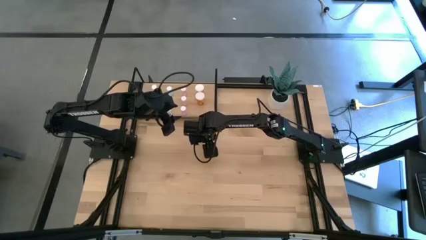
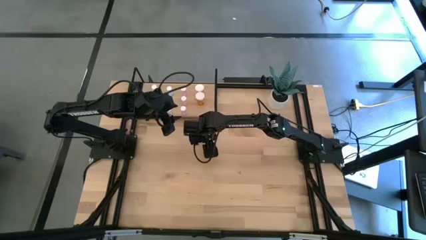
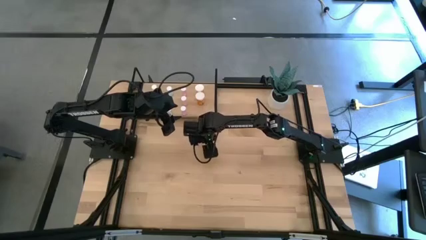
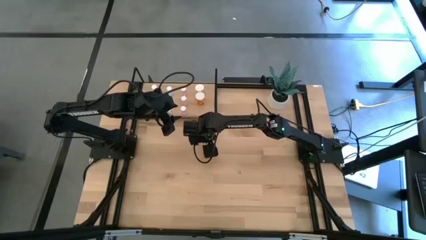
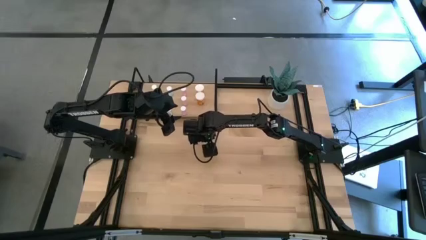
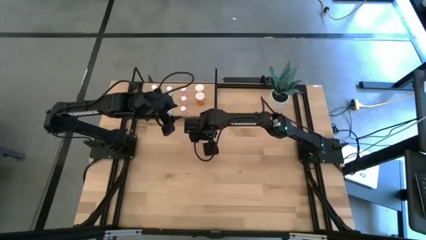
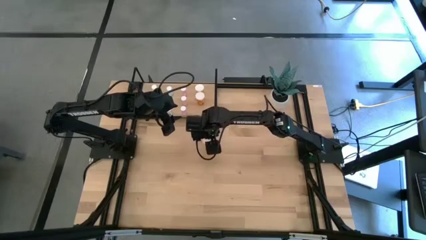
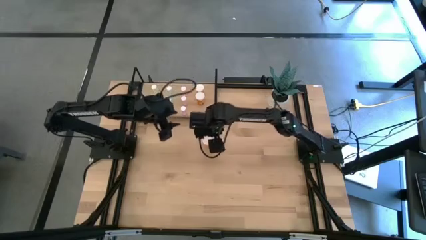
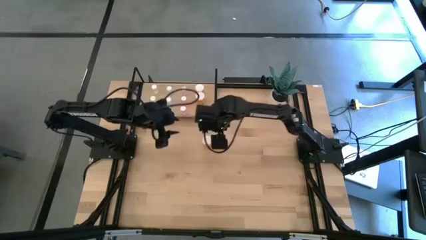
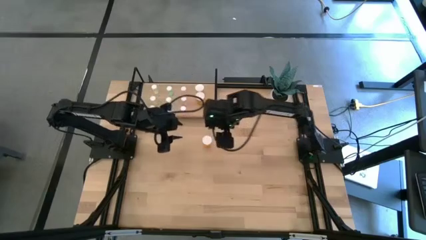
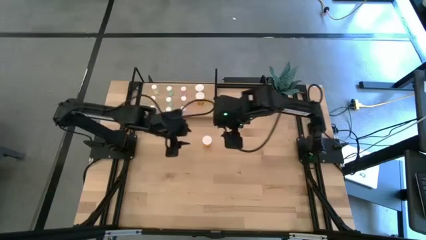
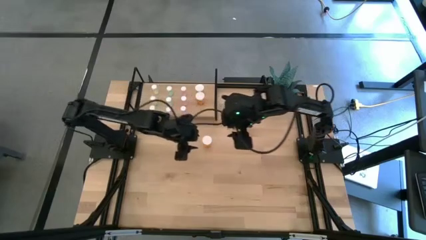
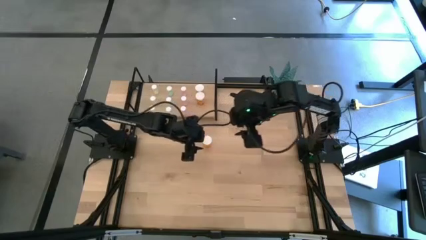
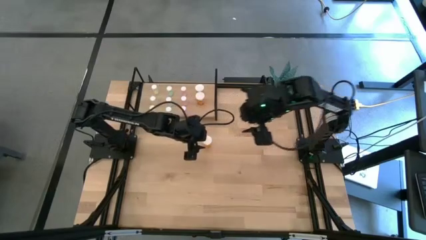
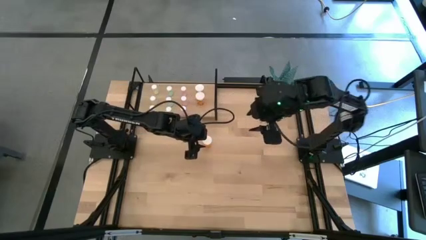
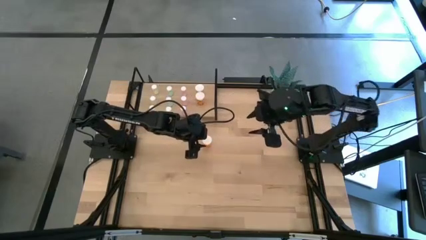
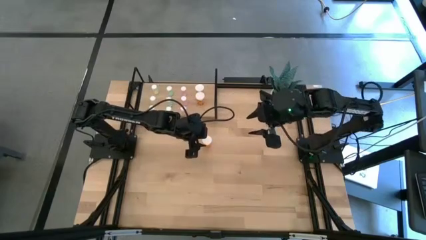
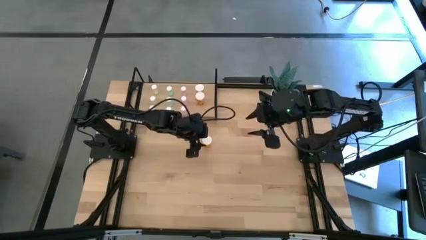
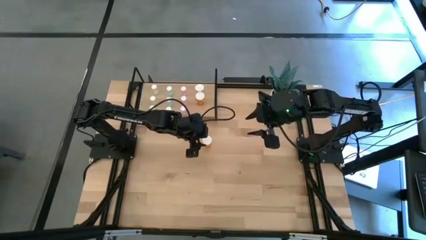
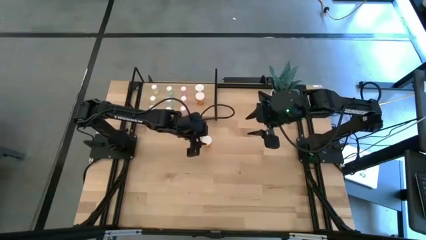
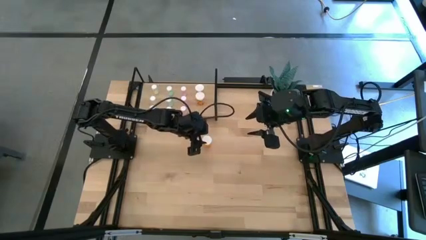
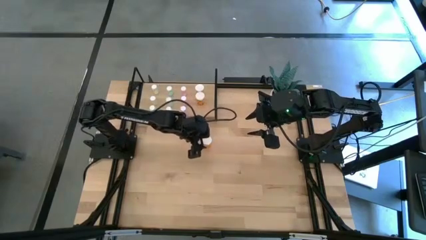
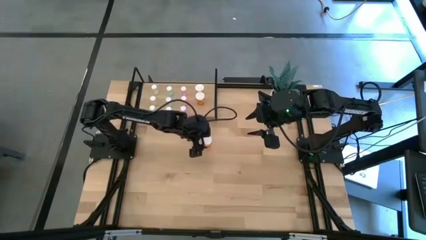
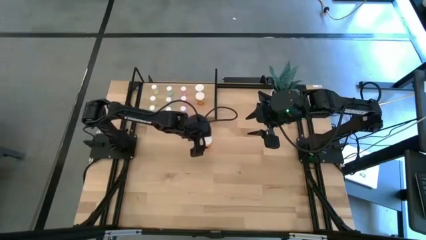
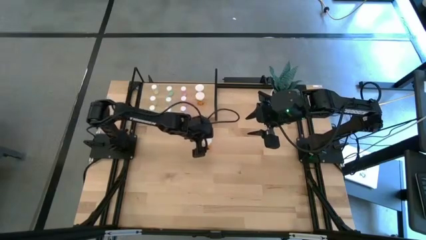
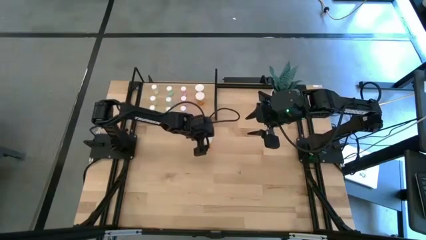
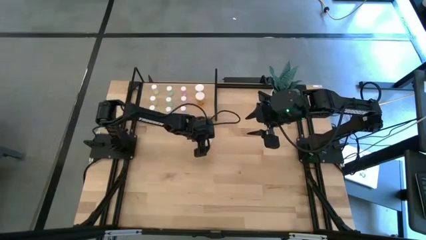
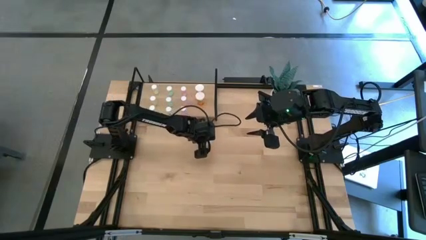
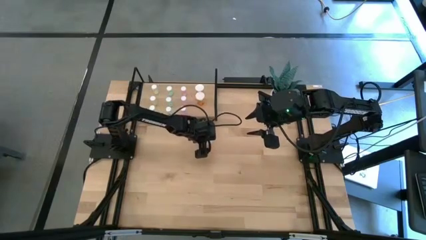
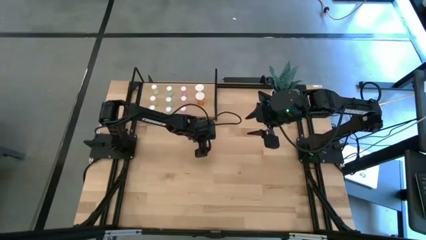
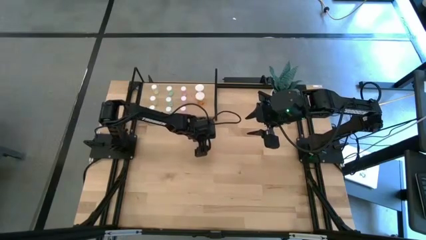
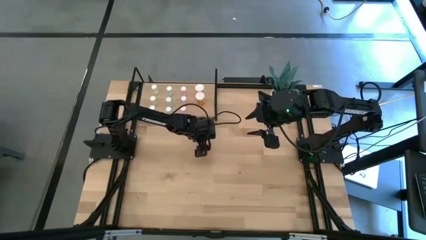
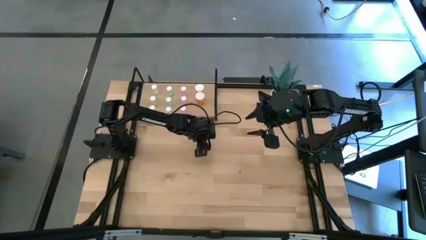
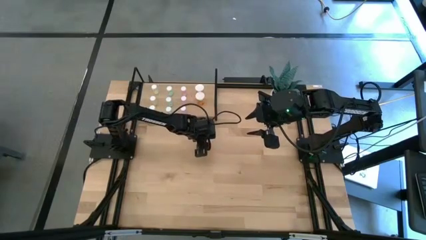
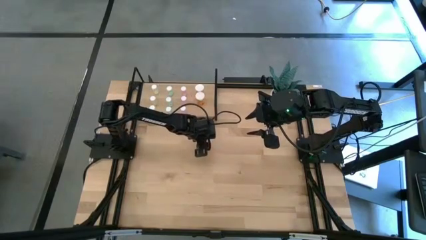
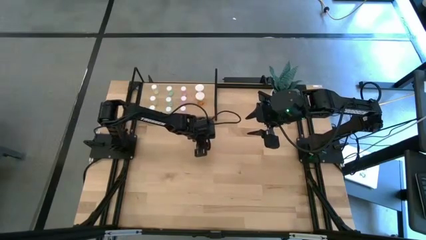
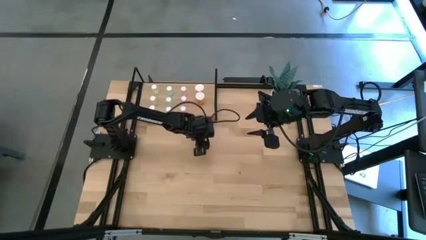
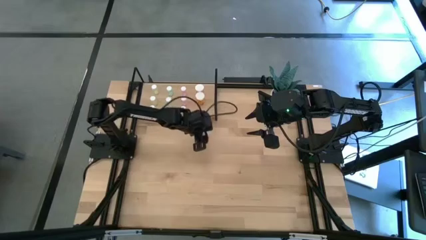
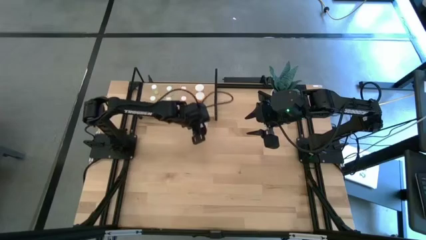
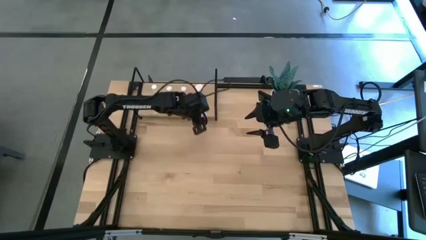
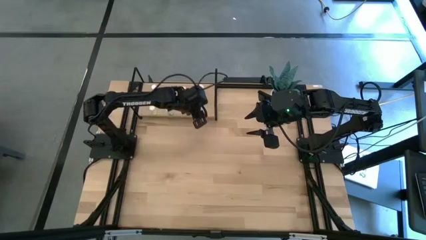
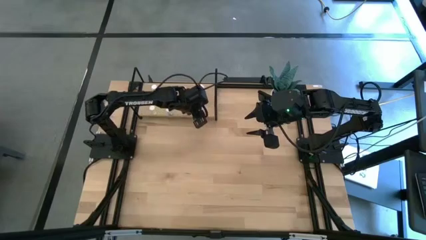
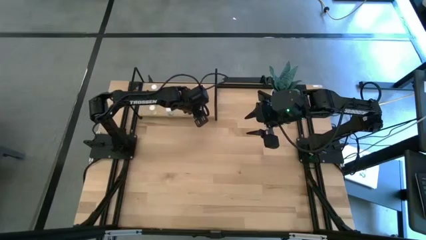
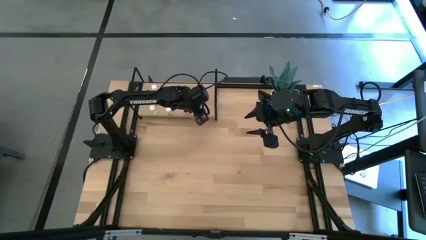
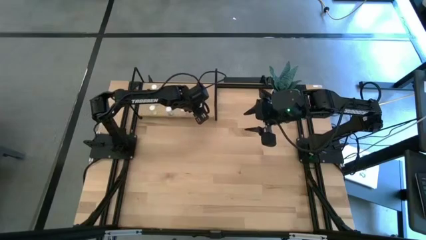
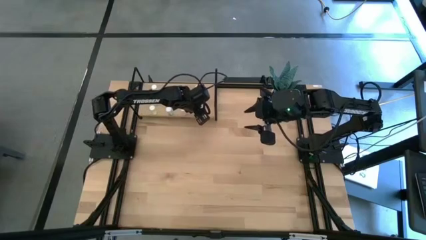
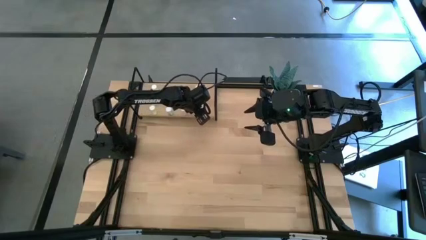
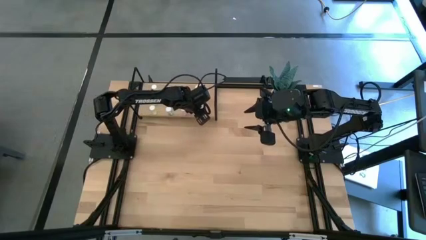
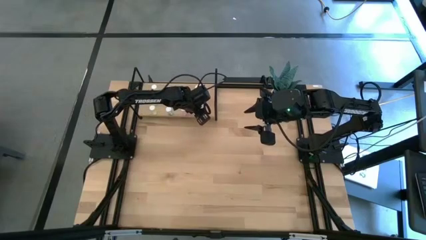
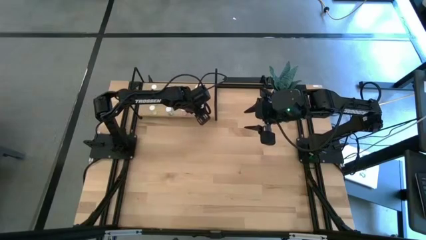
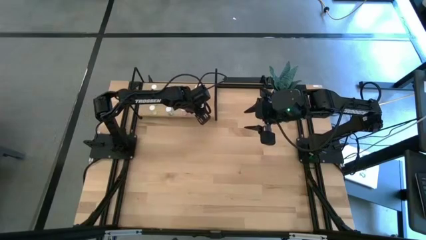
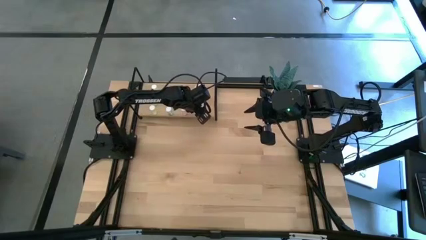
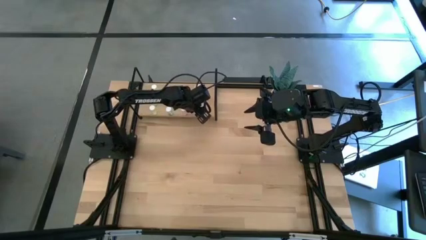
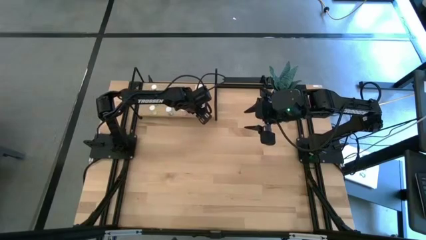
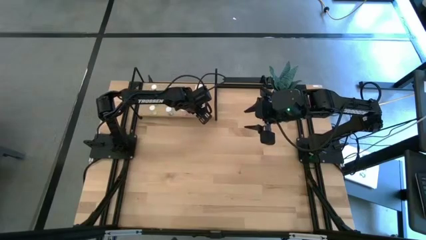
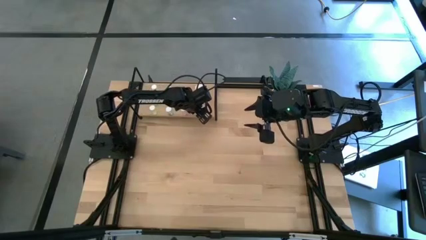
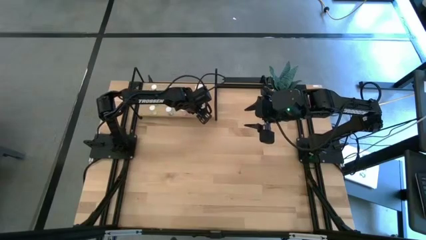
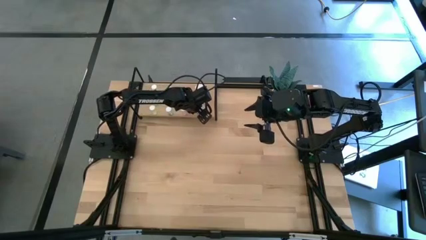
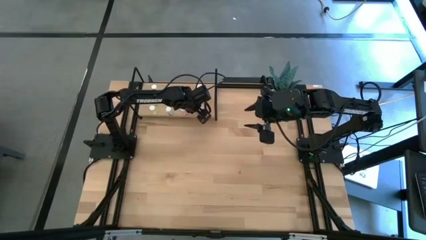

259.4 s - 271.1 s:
Task: Pick and place medicine bottles onto shelf by color
Put the orange pill bottle on the shelf and align it with the other orange pill bottles

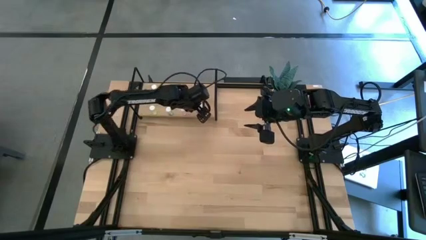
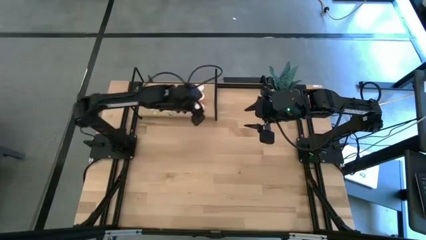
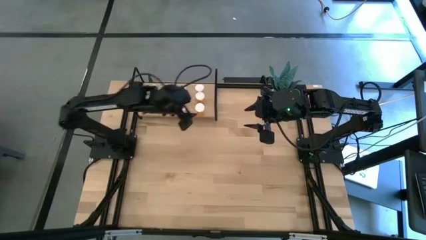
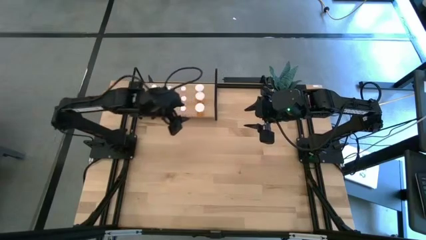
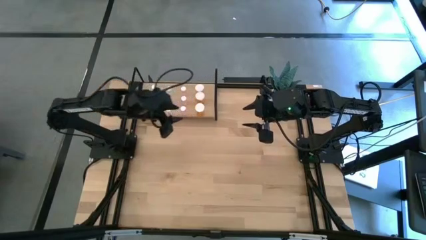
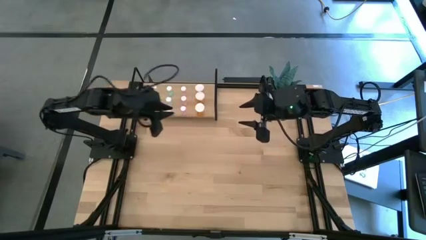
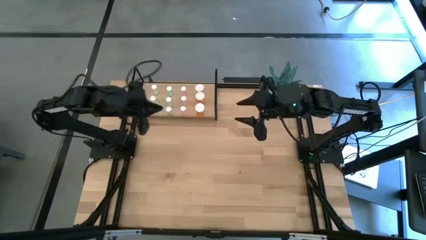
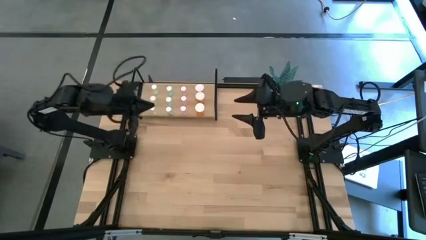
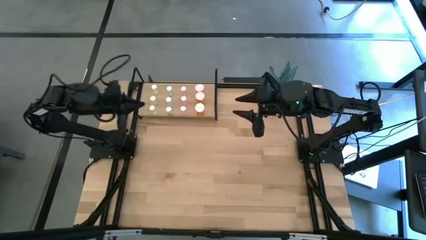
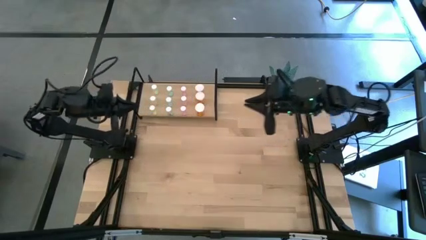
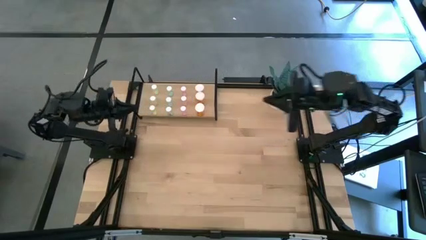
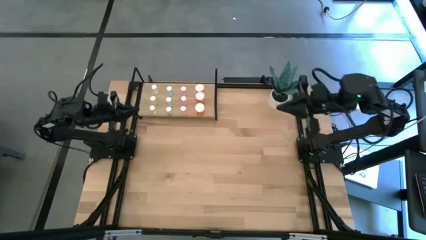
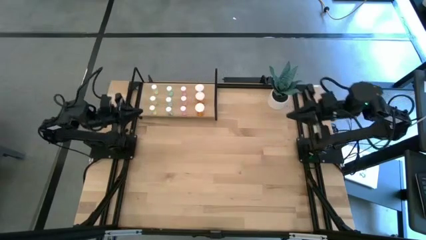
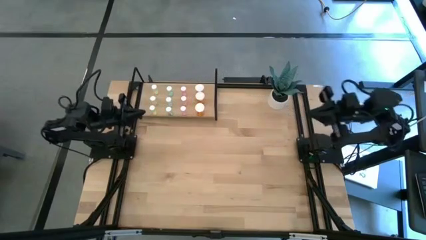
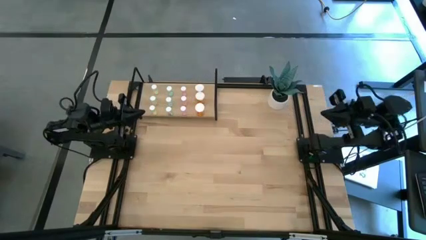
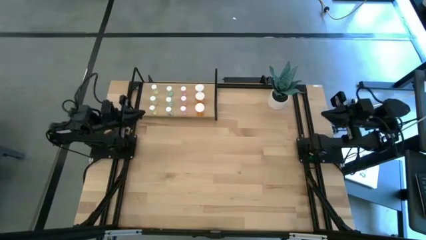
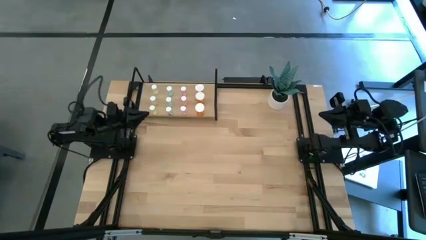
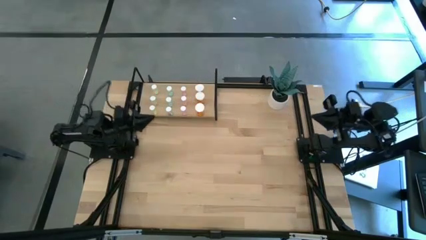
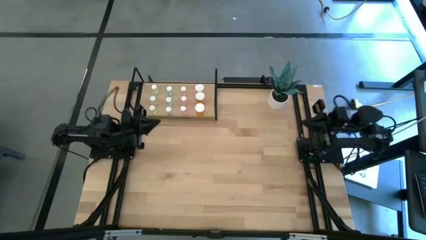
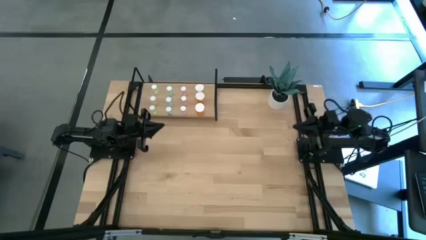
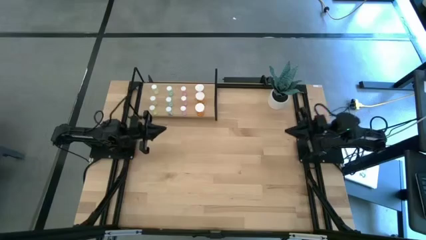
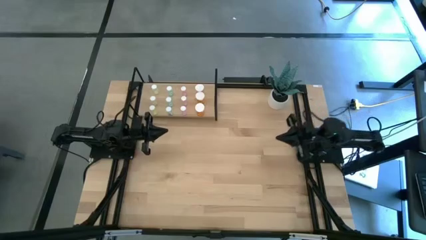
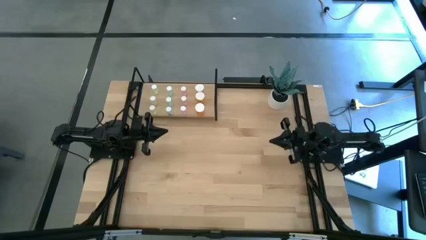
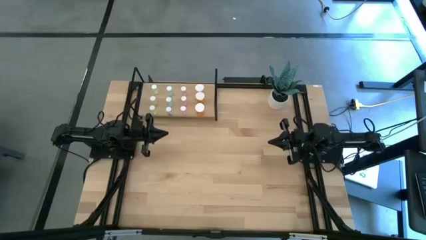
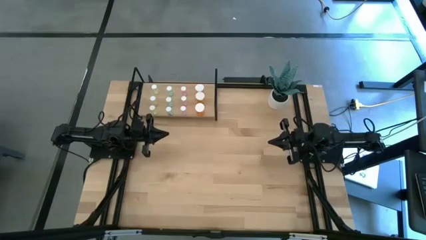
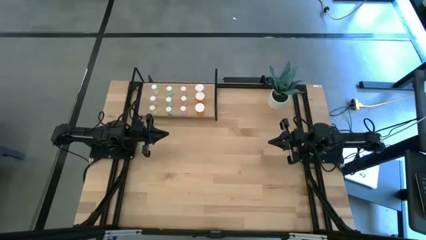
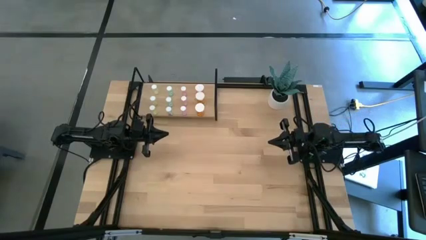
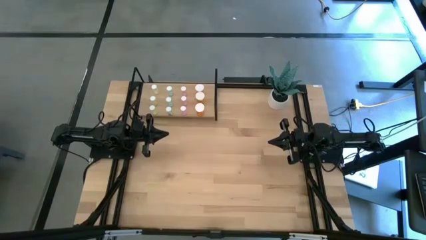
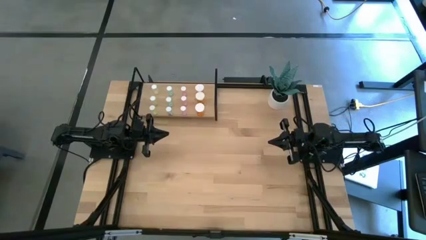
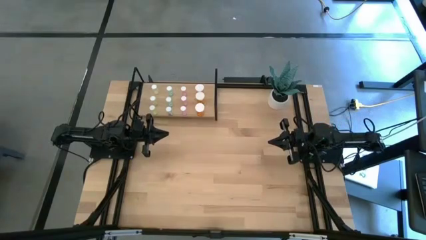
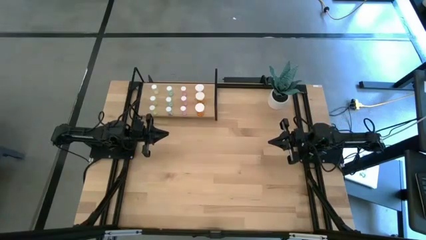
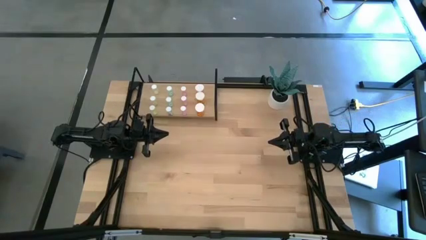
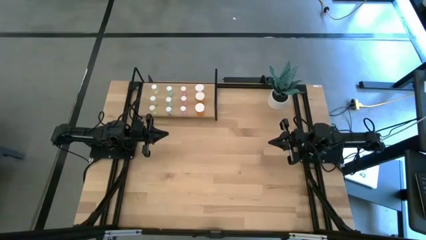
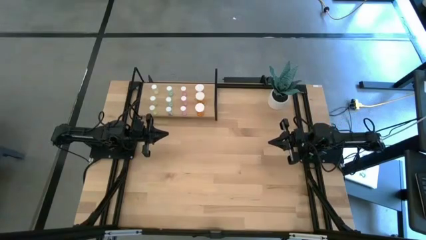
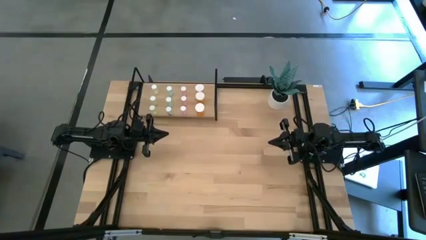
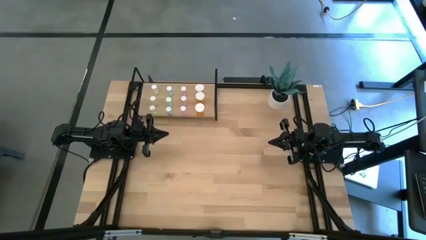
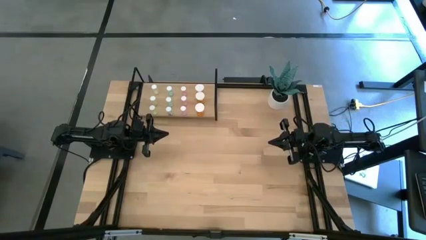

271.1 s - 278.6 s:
Return to Home Position
